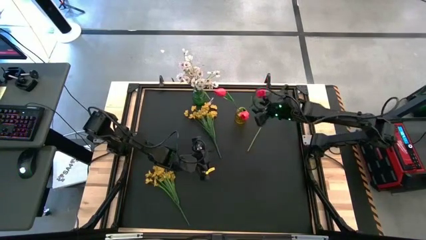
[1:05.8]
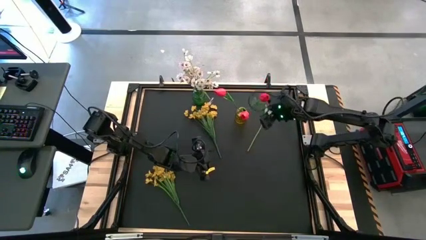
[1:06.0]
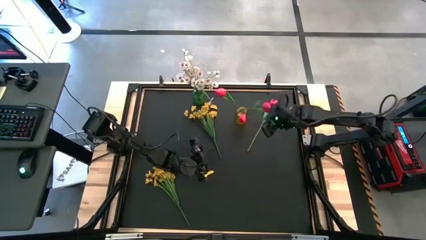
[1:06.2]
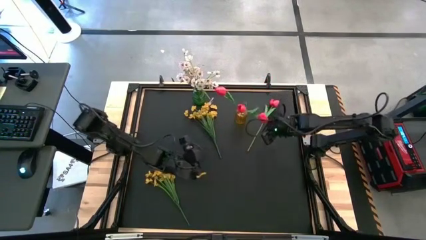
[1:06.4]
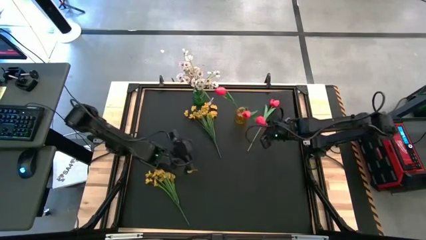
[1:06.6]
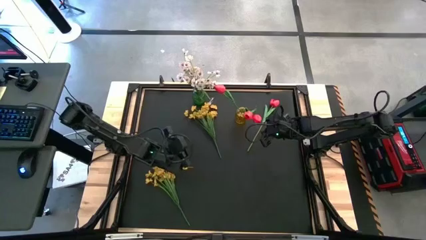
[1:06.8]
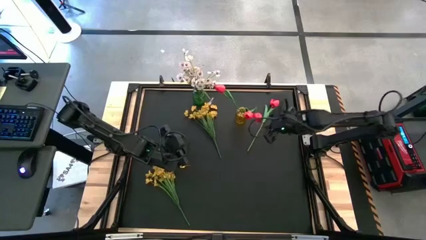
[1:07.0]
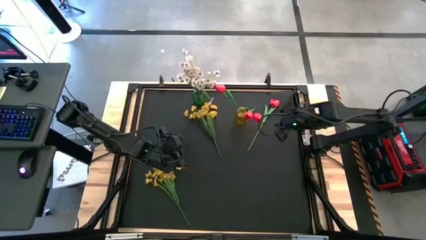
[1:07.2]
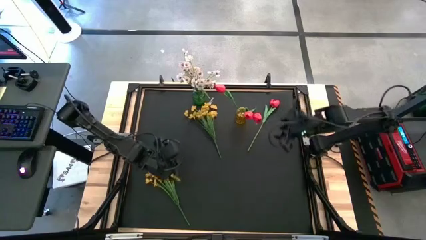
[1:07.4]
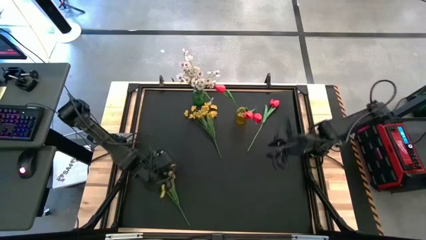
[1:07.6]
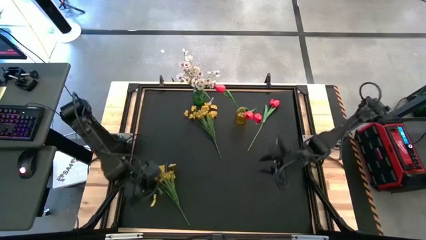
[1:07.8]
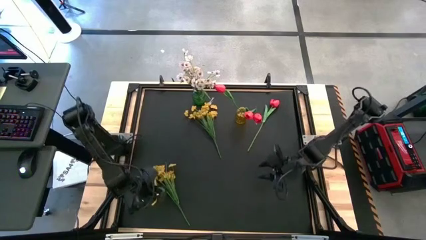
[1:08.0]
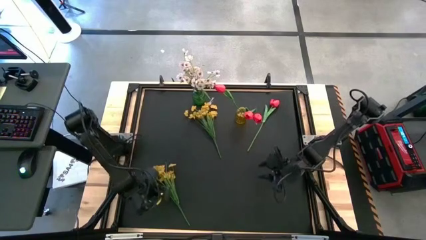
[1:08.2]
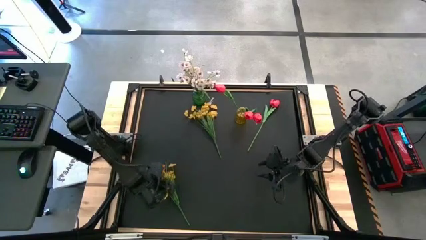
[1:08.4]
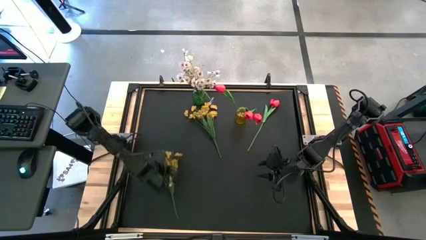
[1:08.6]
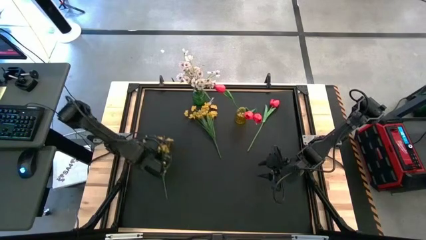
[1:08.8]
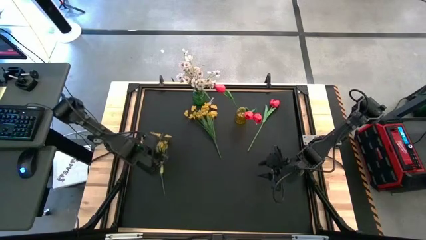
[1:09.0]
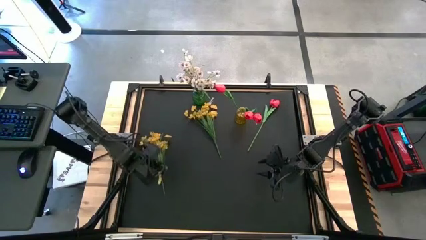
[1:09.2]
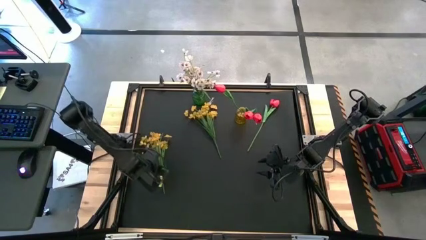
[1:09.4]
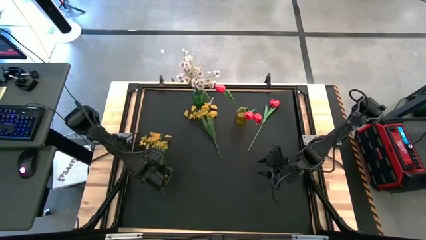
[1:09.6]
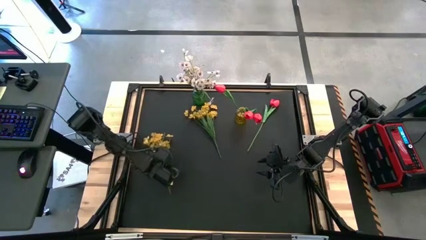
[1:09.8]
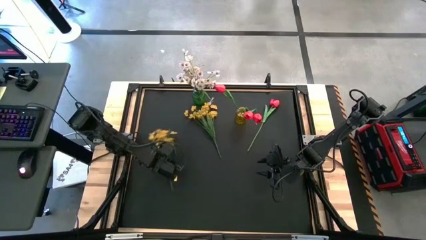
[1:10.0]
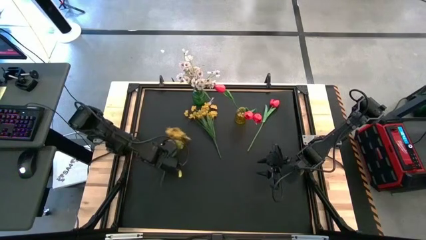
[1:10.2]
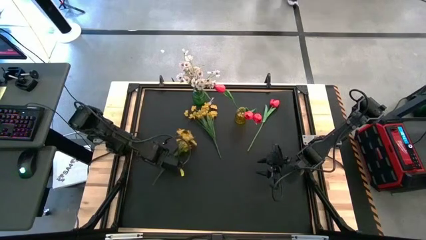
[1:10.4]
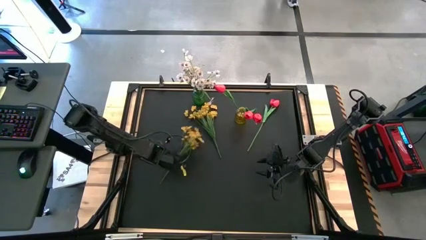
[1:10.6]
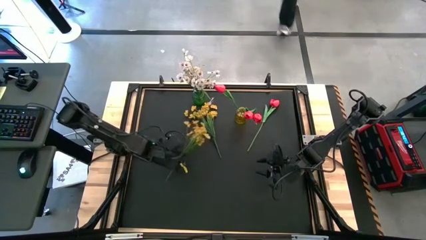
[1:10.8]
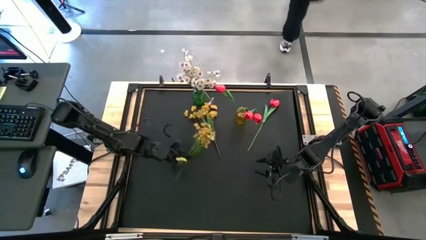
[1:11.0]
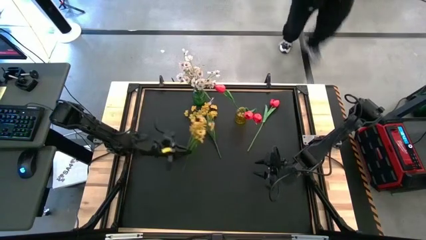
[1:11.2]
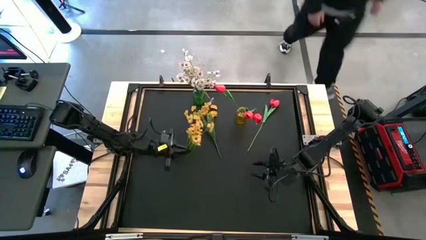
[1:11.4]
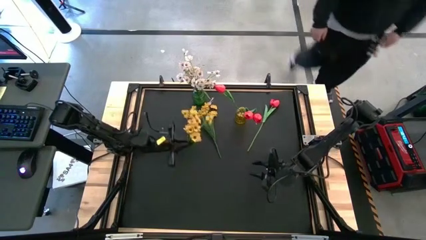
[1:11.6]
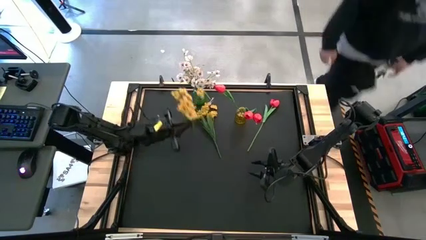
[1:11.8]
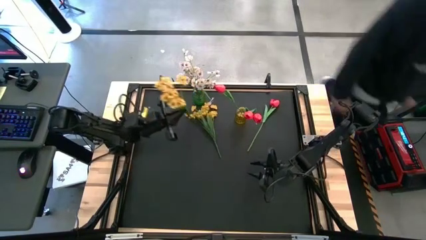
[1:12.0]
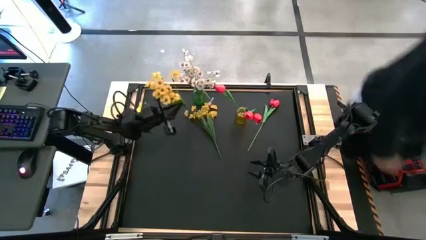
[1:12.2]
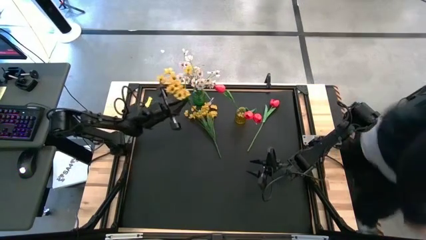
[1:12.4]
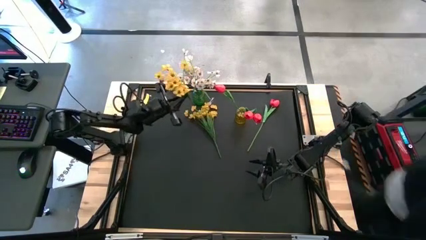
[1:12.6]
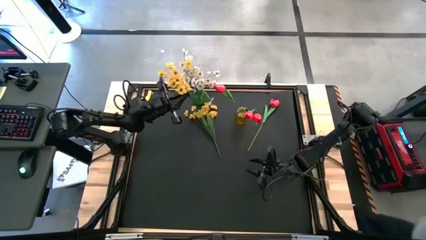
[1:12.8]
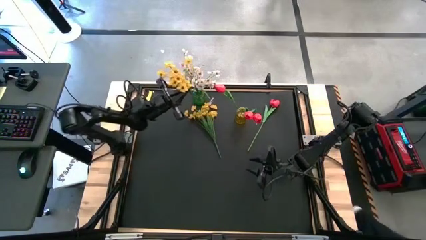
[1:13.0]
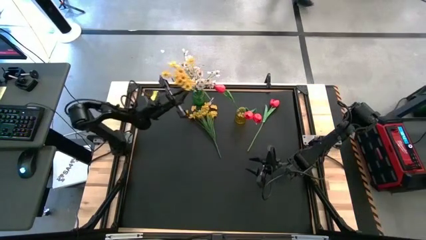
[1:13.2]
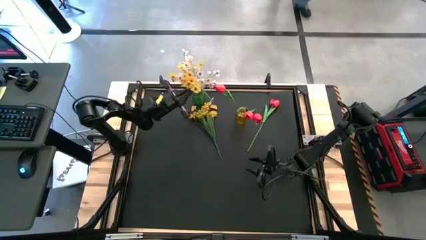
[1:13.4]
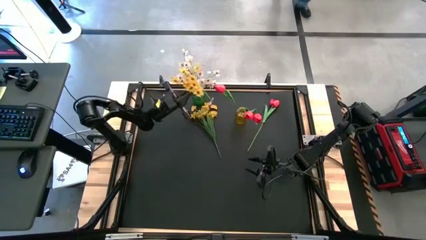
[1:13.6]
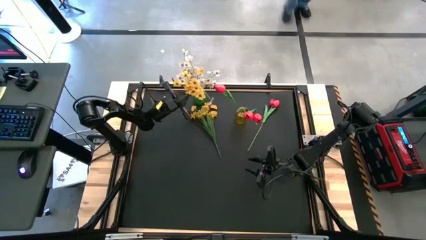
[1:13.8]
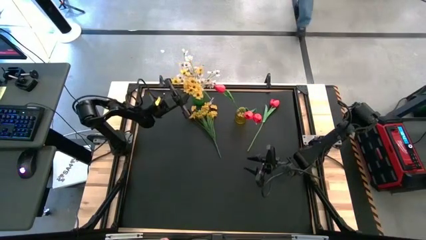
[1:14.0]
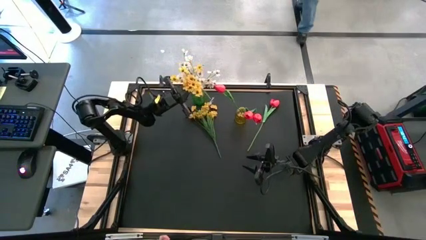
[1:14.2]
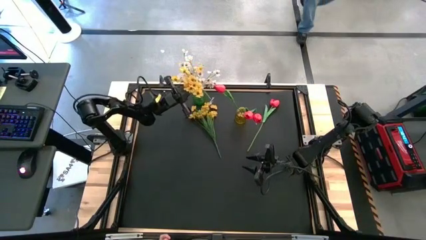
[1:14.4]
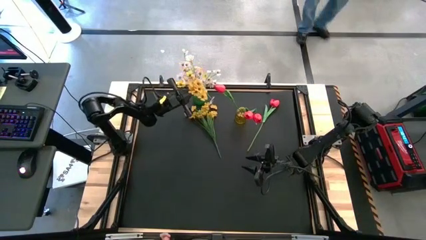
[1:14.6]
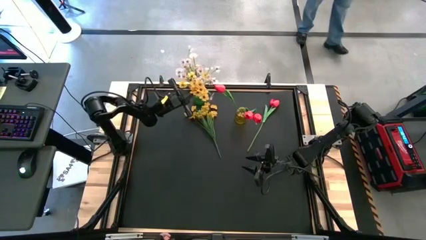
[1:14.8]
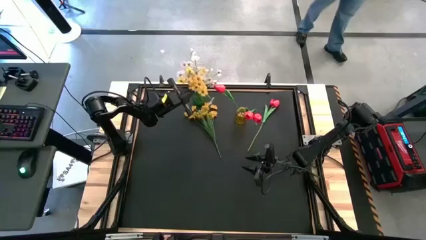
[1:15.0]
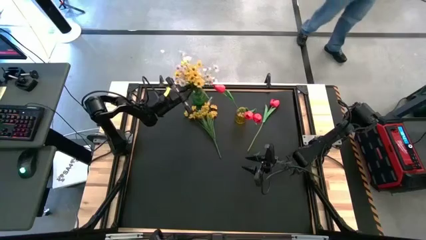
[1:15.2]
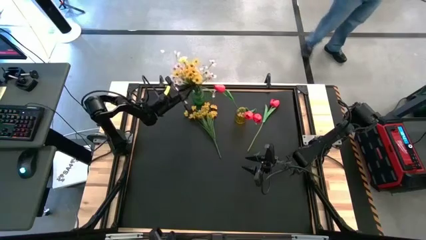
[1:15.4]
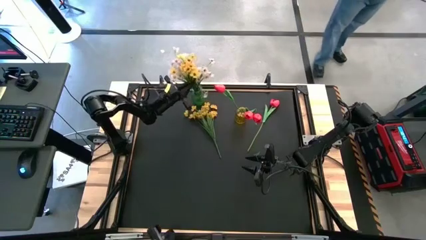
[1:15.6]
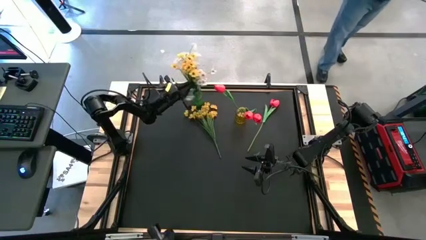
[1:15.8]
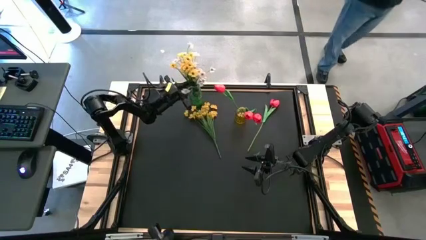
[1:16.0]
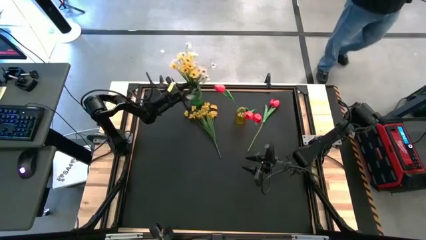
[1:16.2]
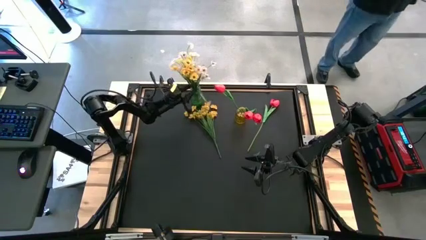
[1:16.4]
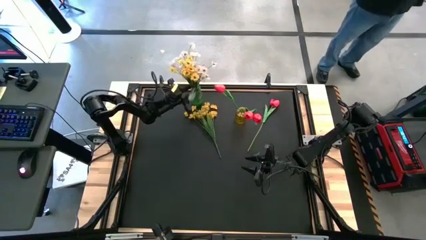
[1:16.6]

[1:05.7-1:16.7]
Task: Sort flowers into vase by color
Put the bottom yellow flowers into the green vase

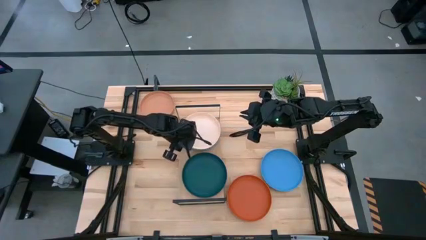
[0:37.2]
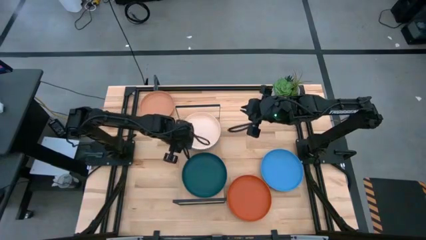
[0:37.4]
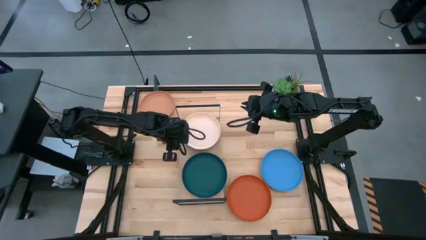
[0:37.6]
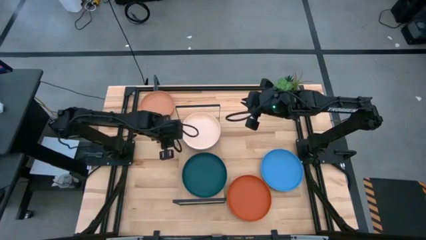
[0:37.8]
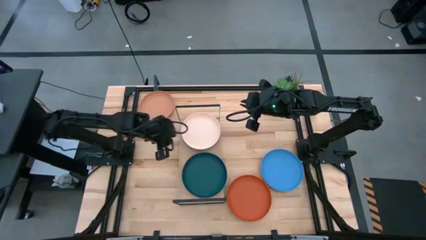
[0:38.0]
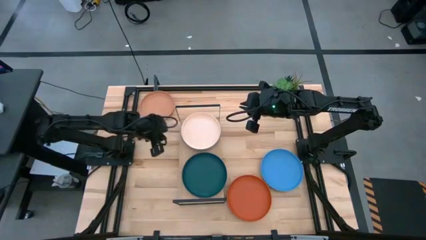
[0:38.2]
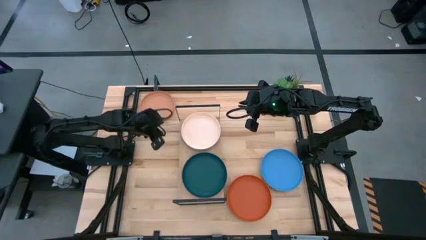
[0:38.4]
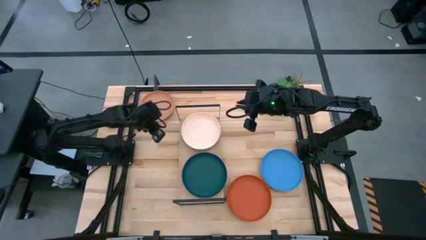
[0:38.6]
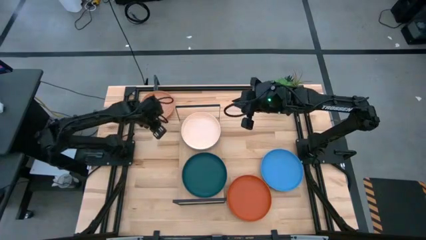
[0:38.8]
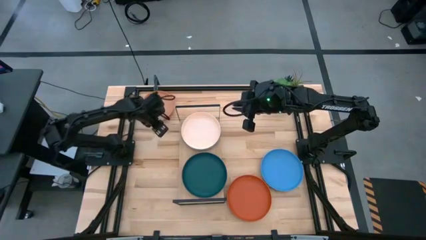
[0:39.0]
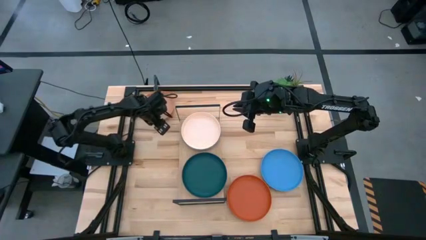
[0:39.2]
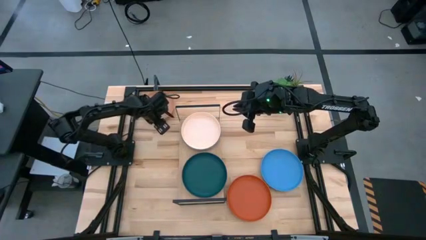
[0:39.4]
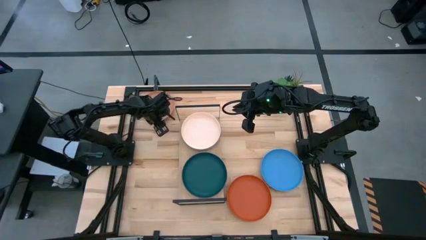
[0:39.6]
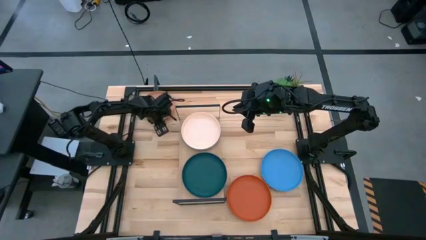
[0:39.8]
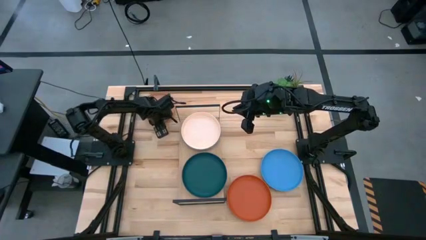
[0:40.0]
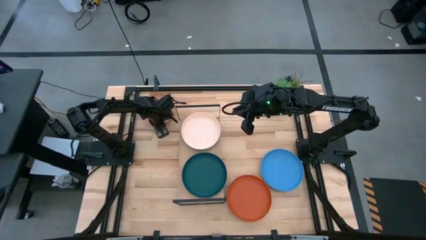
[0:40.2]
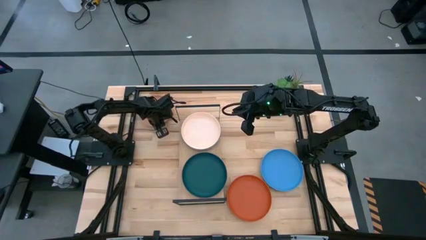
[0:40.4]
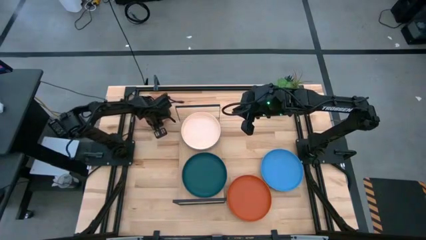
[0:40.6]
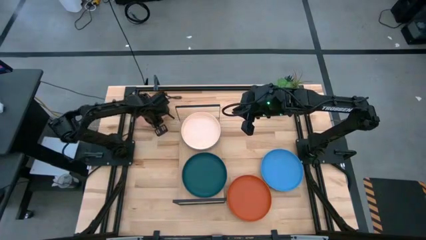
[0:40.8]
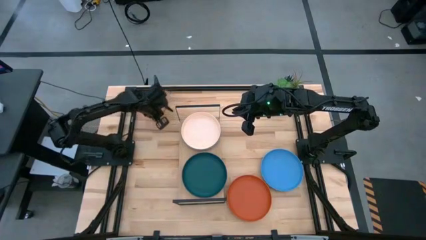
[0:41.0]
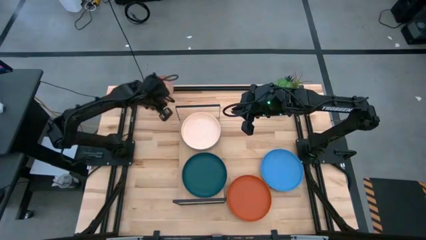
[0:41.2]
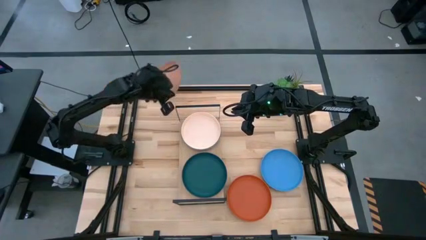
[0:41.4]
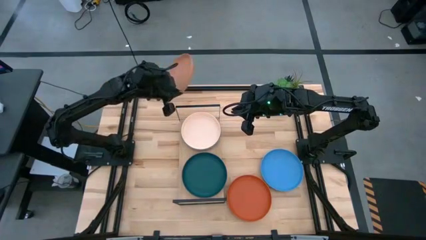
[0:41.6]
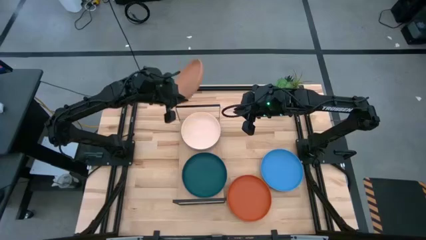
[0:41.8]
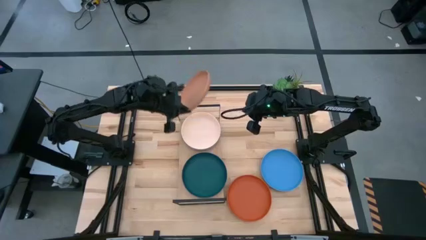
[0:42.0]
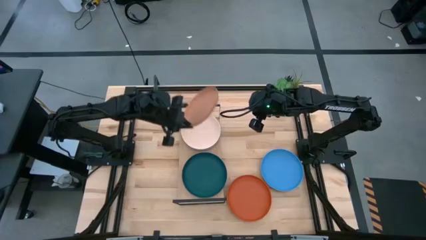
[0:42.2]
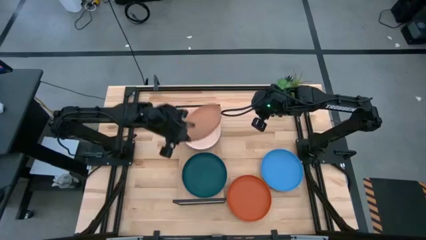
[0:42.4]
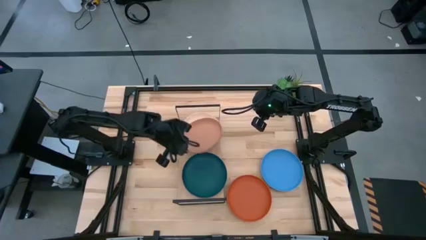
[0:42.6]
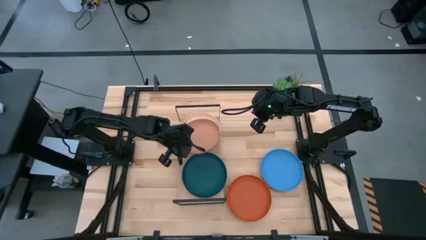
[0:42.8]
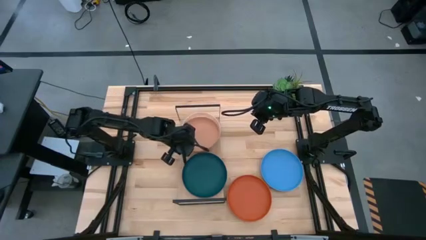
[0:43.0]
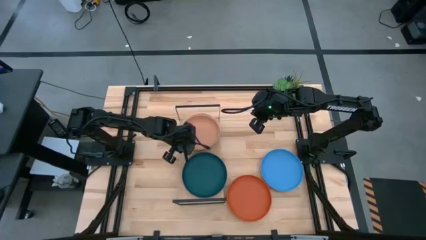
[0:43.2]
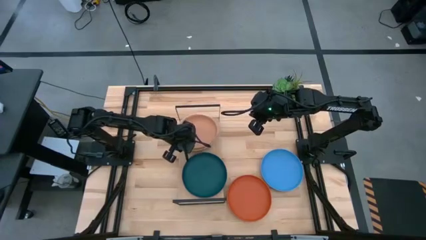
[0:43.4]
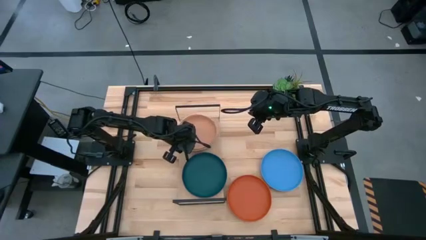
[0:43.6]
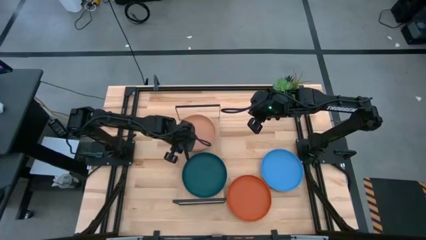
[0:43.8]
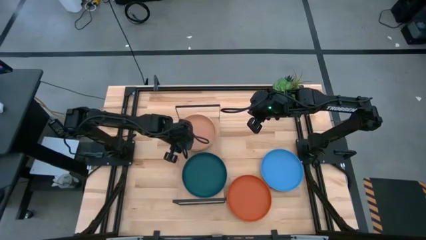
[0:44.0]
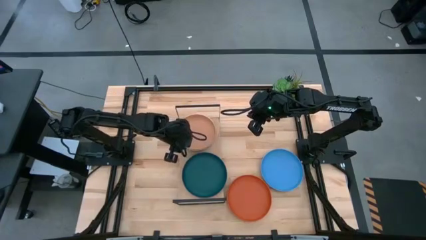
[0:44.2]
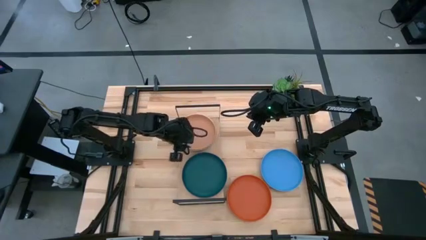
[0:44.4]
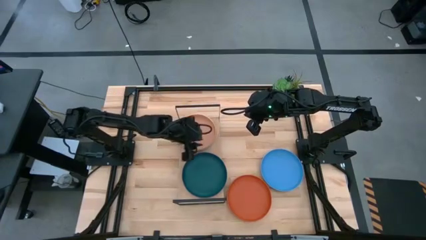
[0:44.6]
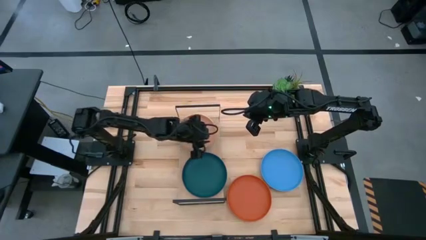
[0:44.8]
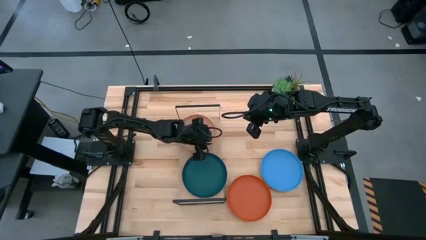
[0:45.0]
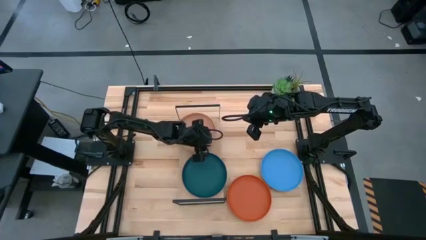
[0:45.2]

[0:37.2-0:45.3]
Task: Place and stack plates onto a shelf
Stack the brown plate on top of the light orange plate on the shelf
